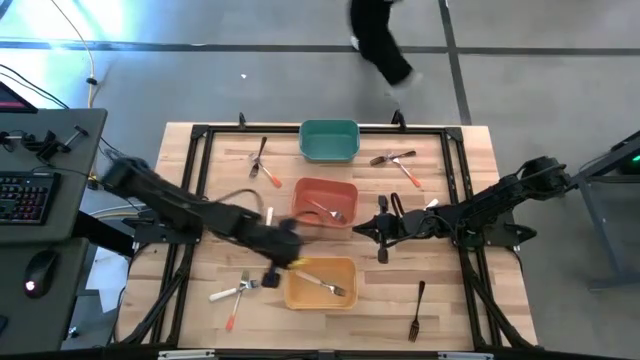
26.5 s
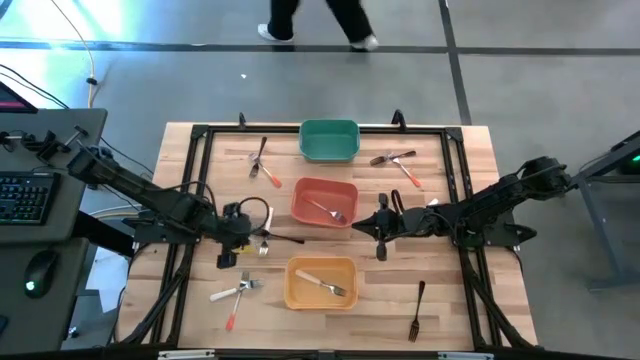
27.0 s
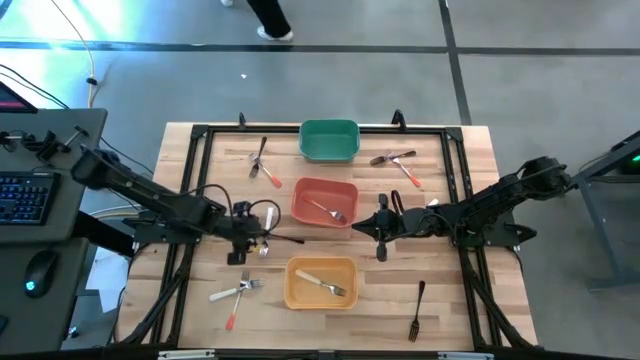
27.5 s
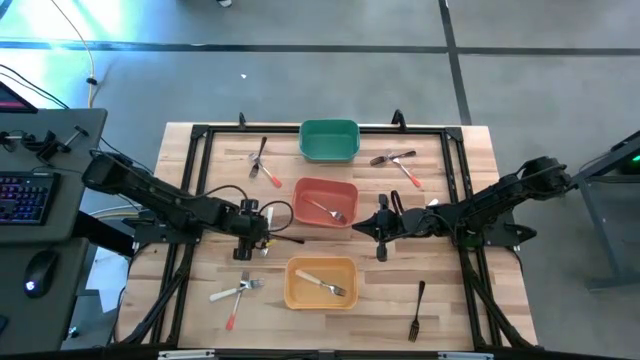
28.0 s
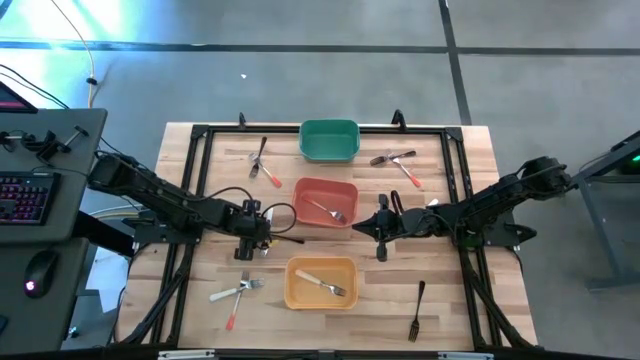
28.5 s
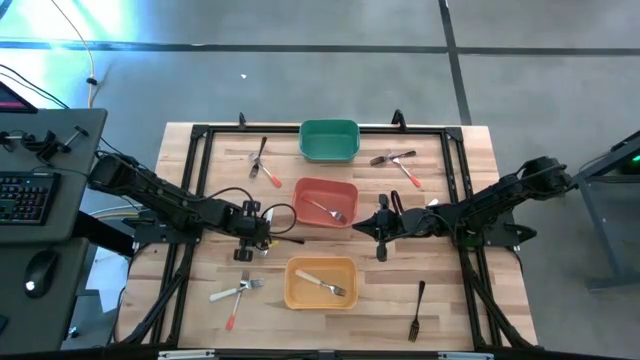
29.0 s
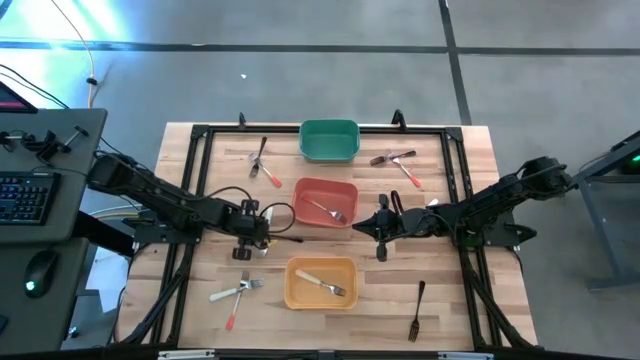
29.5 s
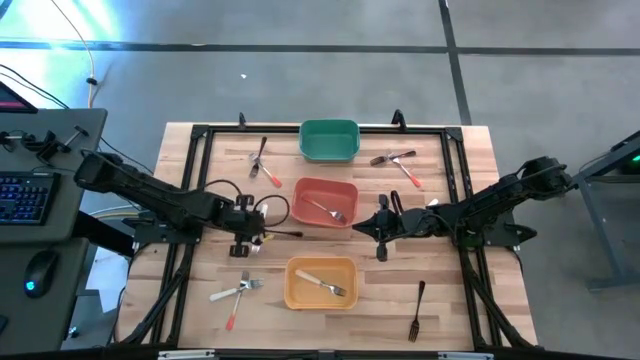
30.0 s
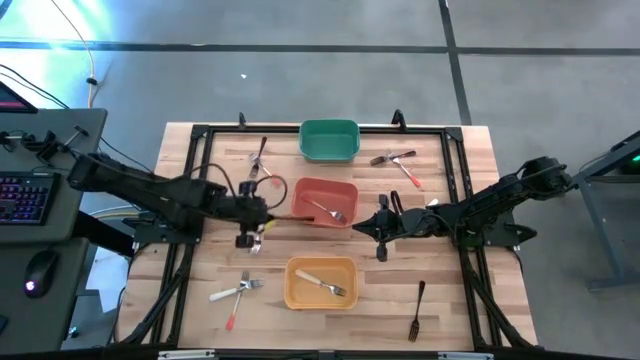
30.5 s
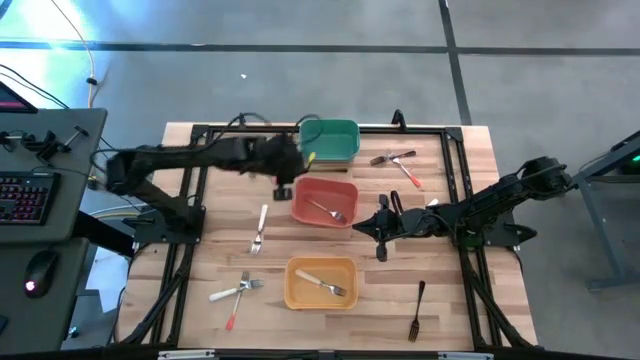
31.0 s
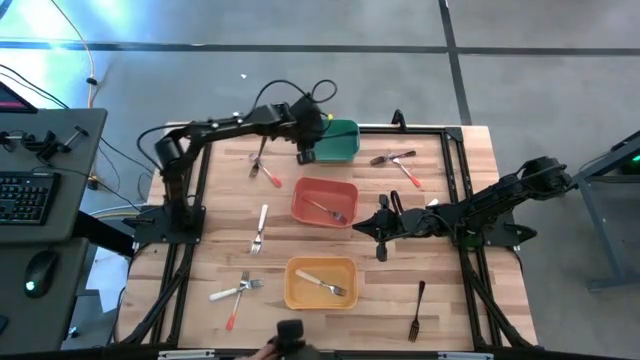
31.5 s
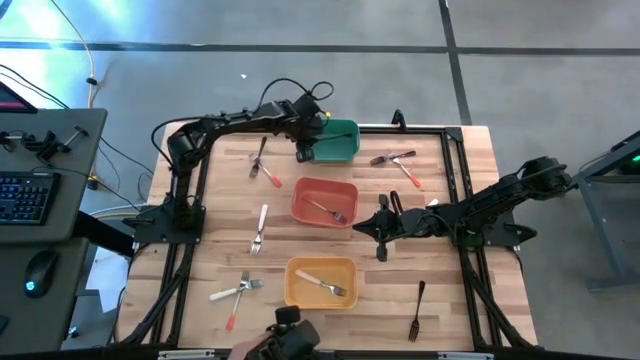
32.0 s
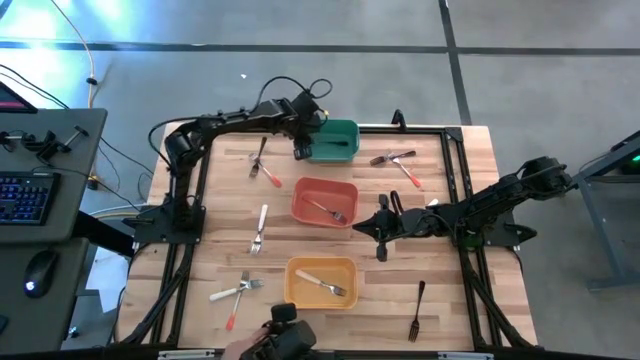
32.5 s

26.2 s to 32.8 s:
Task: Sort silverware by color (type)
Put the black fork into the green bin

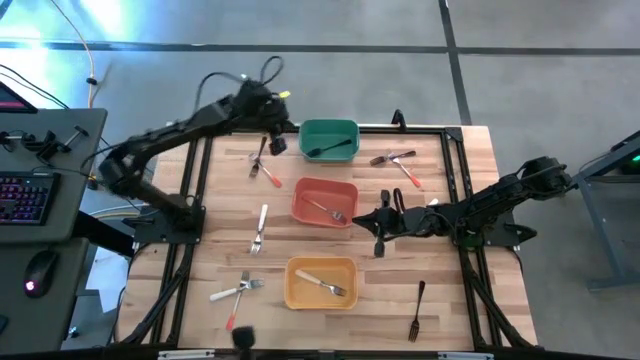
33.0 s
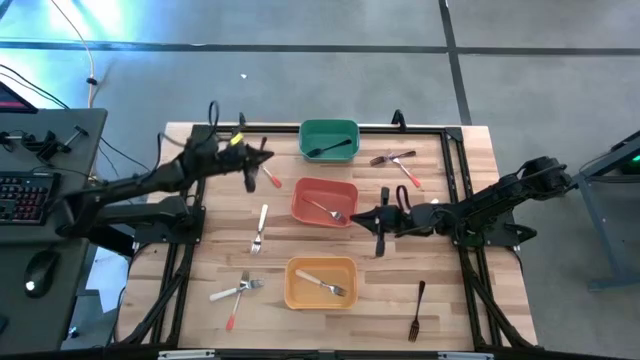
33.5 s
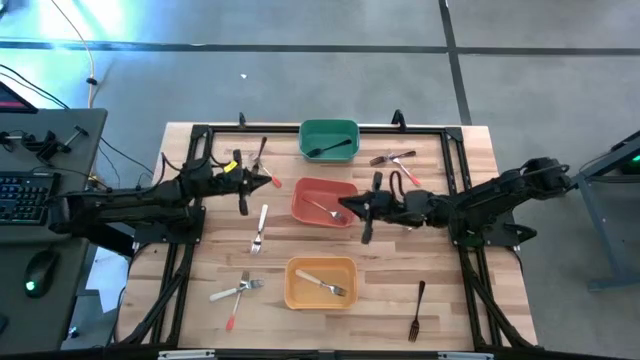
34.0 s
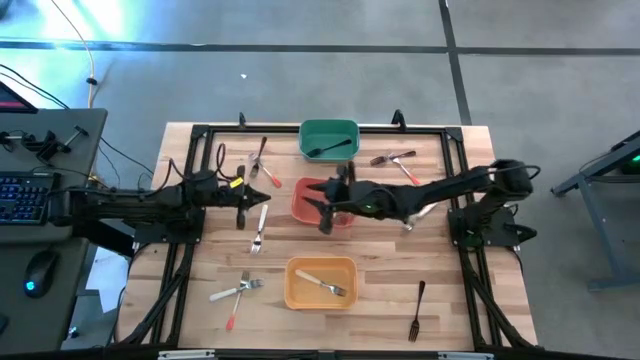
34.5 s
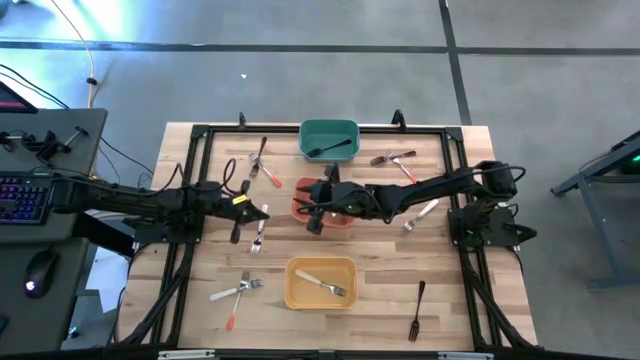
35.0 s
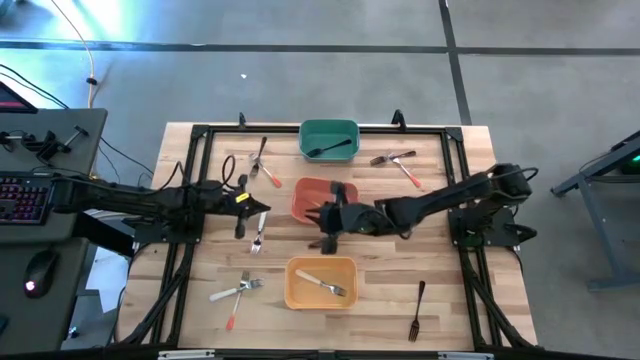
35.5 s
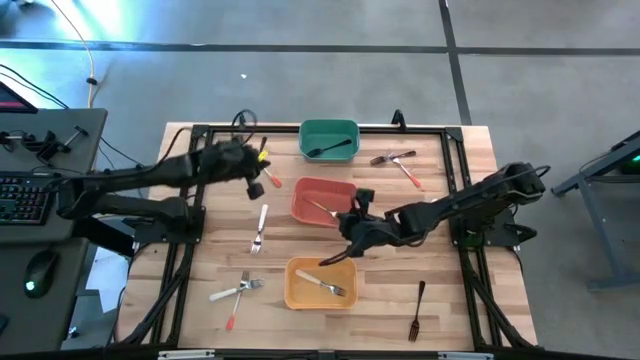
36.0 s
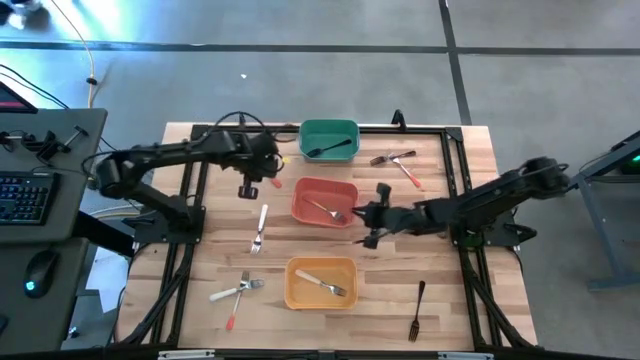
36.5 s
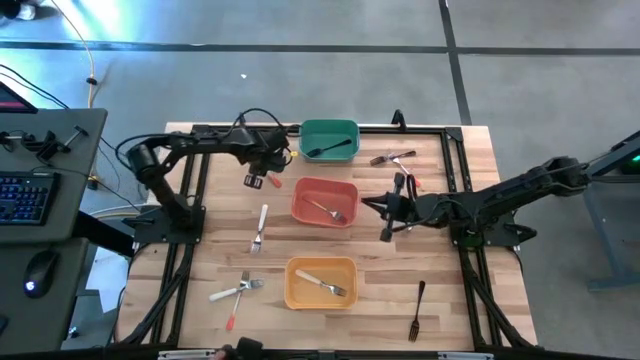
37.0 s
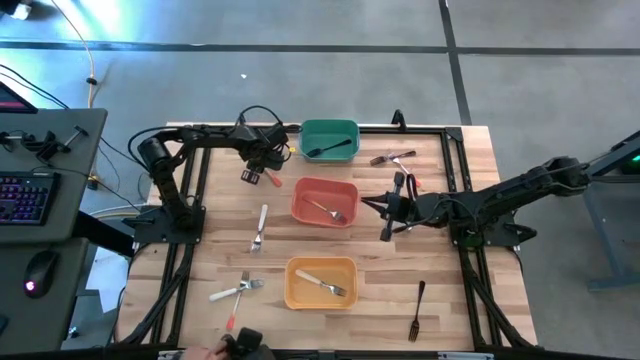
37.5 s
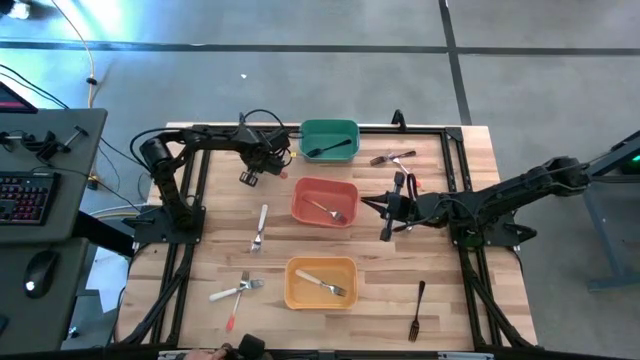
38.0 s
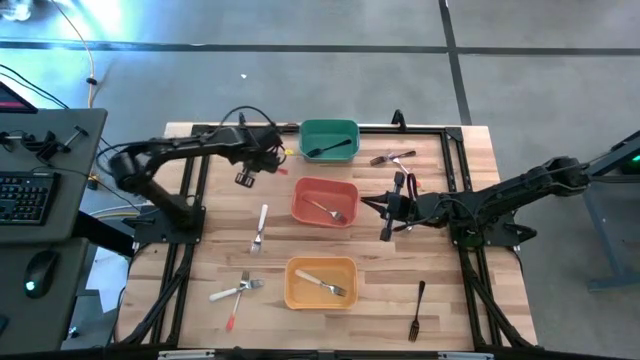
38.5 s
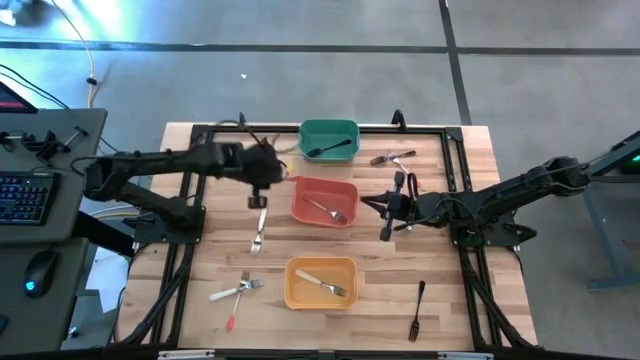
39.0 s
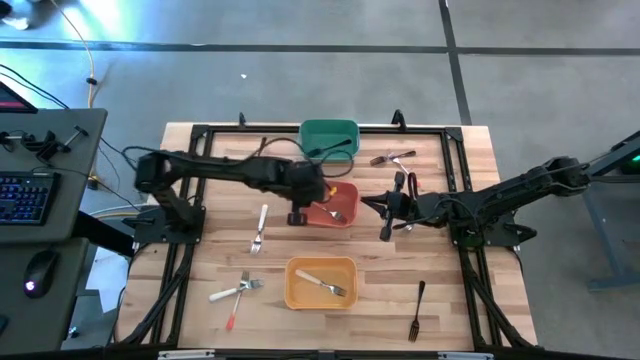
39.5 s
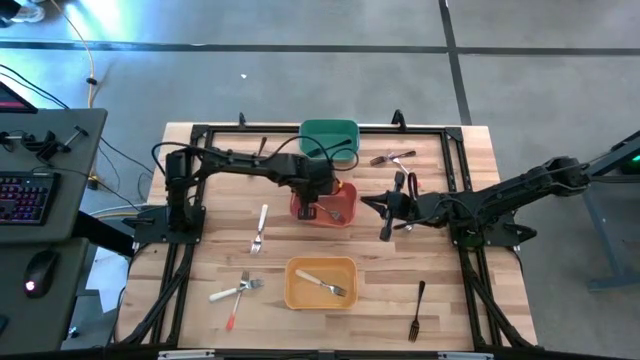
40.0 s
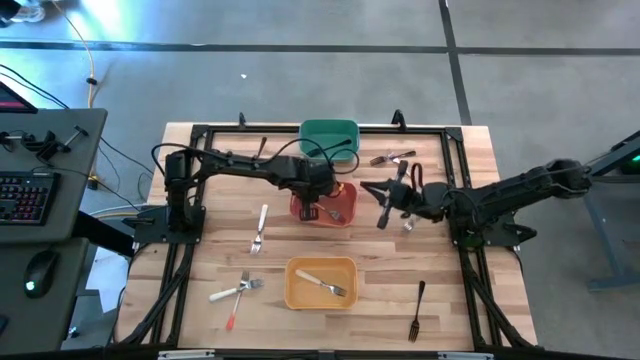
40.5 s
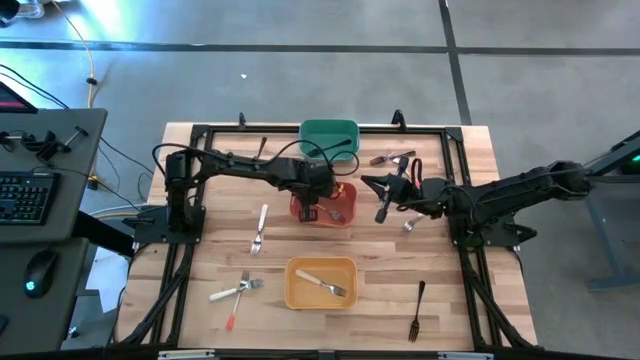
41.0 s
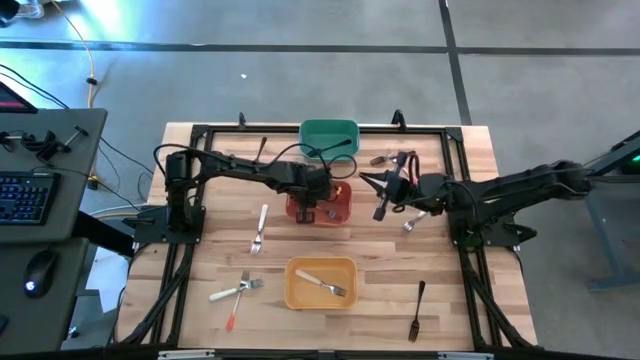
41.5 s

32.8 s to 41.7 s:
Put the orange fork into the orange bin

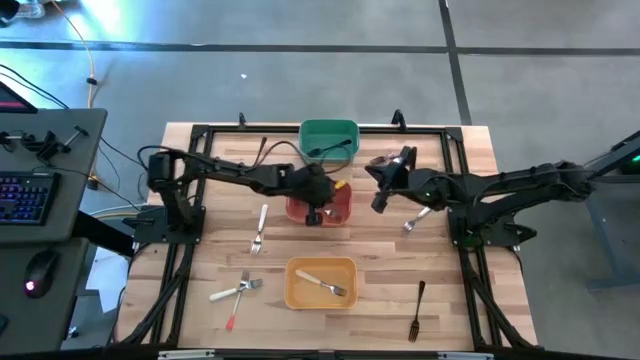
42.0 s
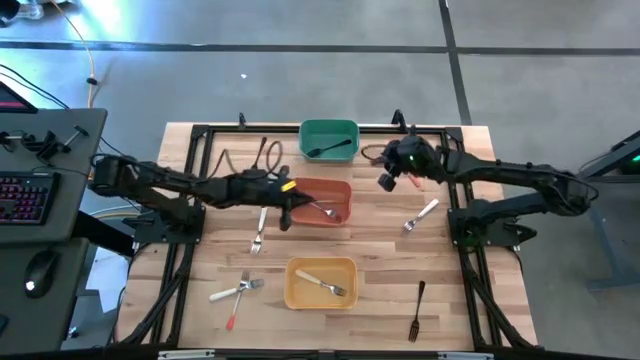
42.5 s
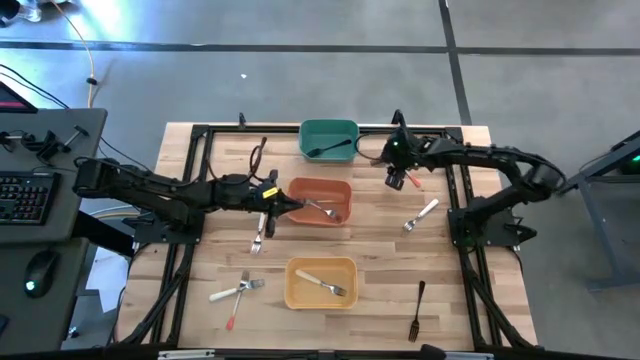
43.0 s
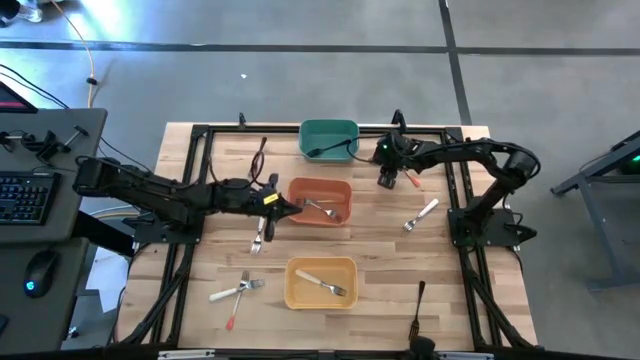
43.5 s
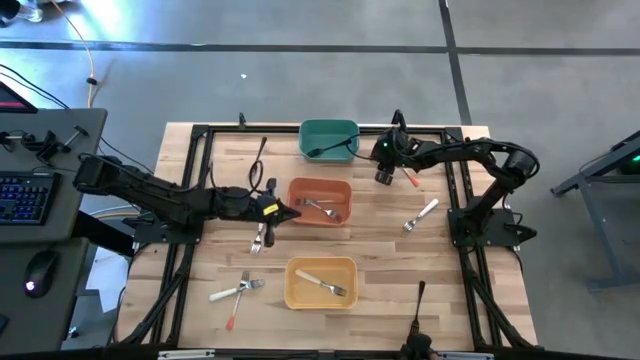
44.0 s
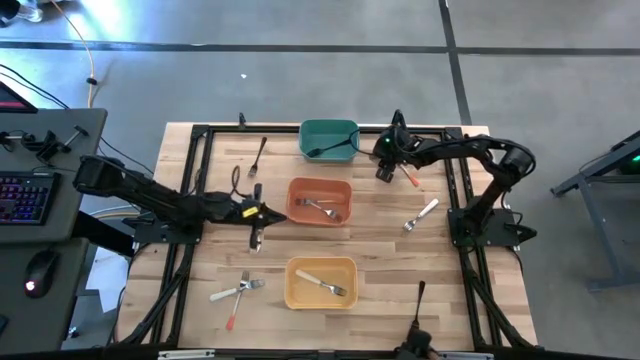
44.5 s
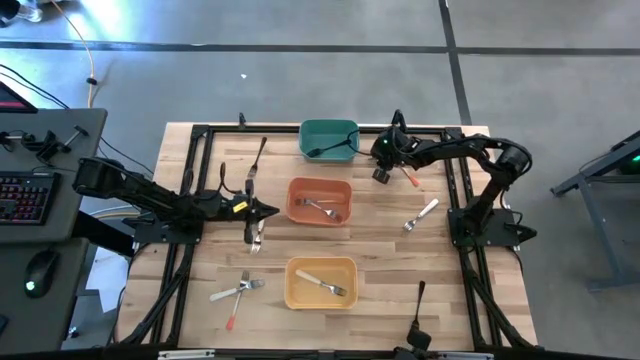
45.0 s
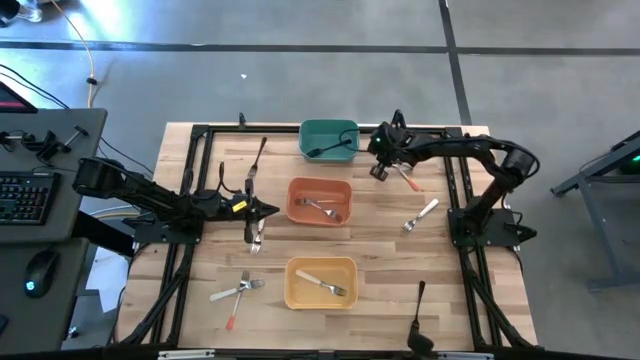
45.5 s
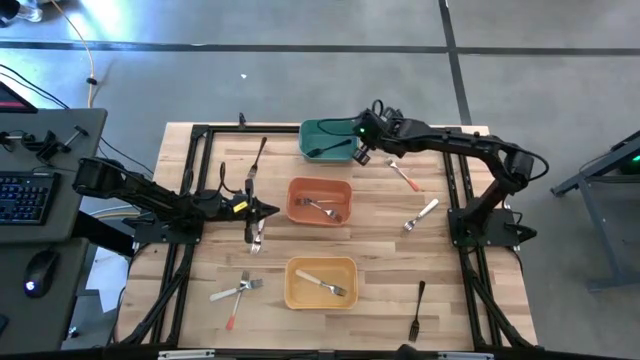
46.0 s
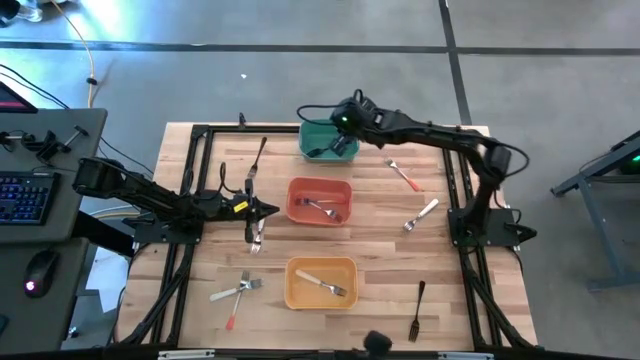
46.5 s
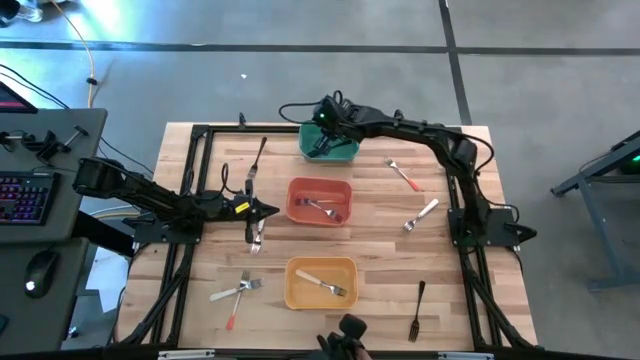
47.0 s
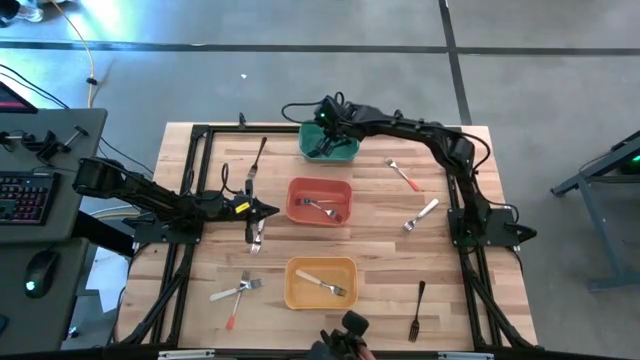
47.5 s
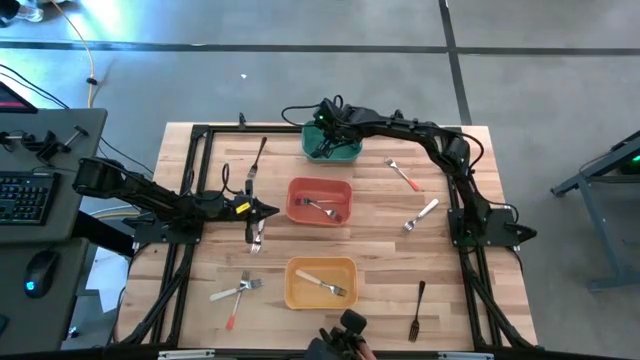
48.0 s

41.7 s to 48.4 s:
Put the black fork into the green bin
